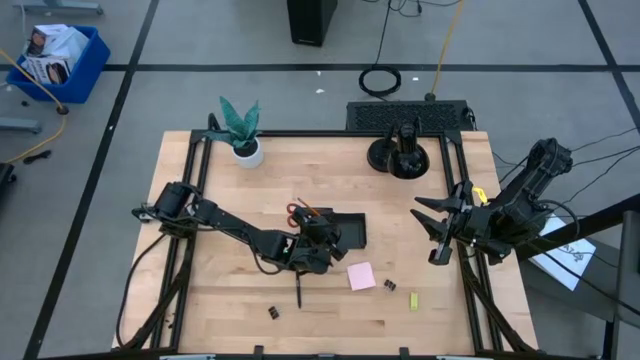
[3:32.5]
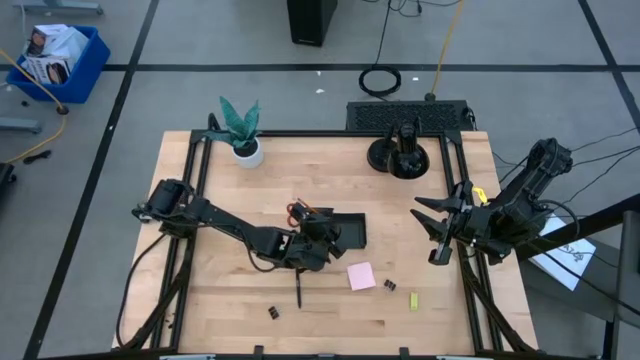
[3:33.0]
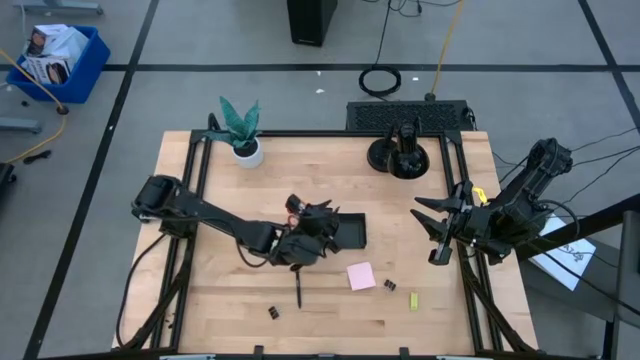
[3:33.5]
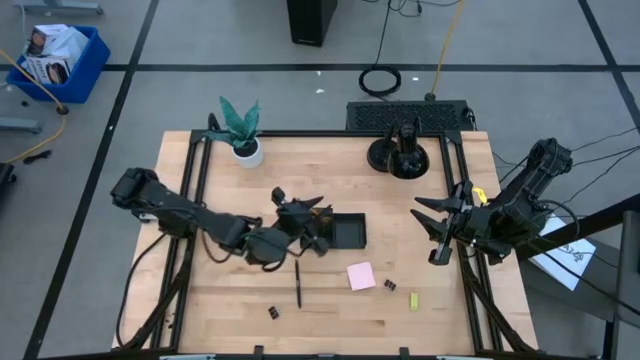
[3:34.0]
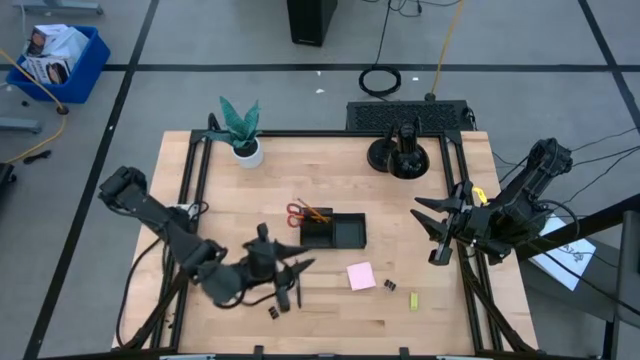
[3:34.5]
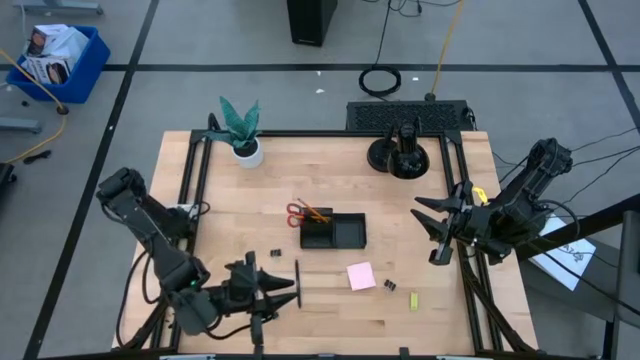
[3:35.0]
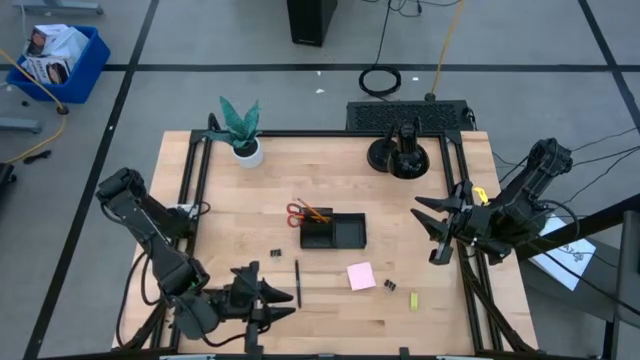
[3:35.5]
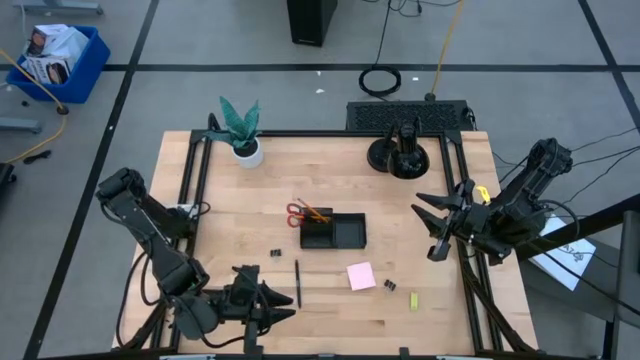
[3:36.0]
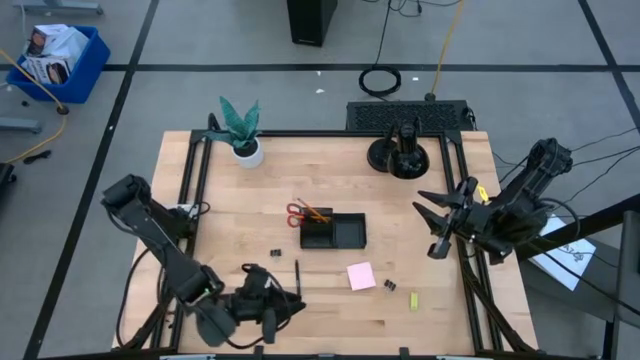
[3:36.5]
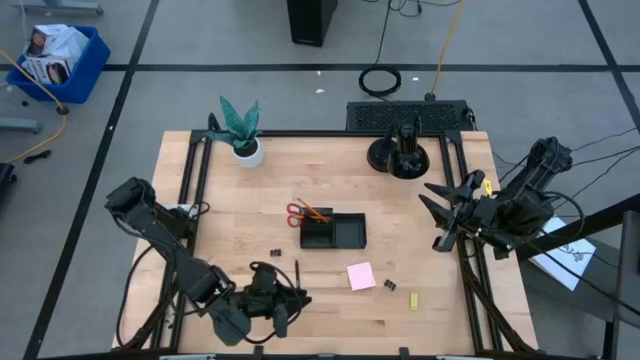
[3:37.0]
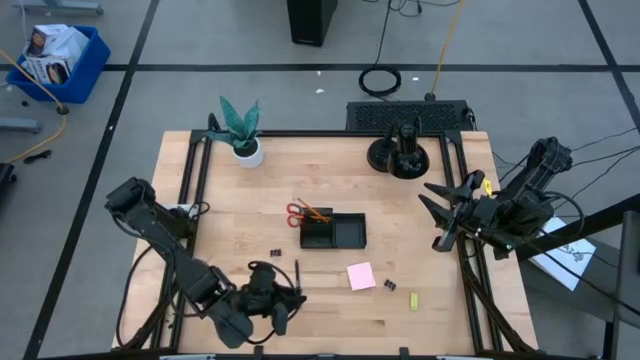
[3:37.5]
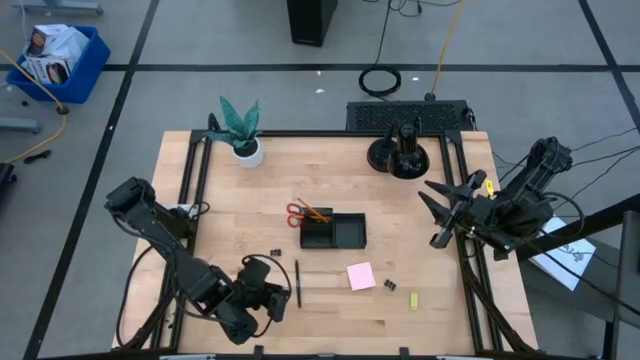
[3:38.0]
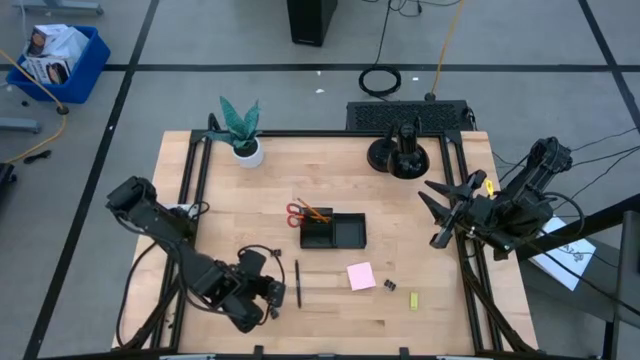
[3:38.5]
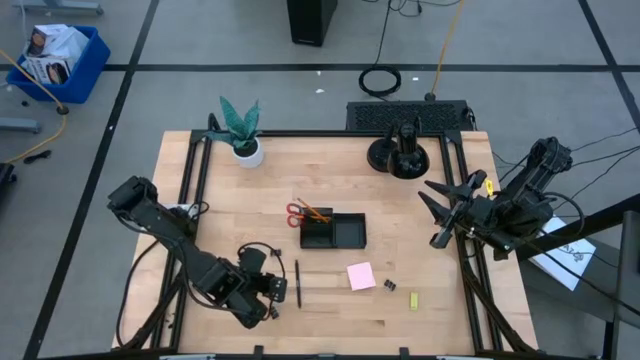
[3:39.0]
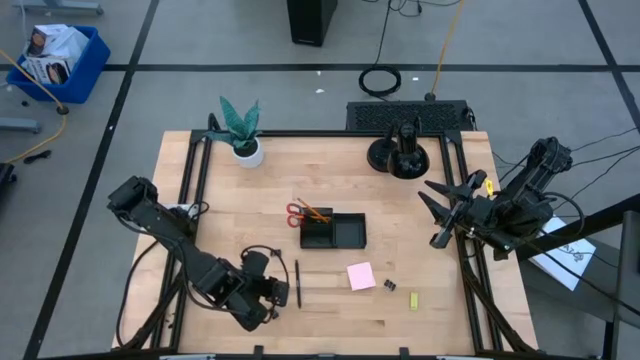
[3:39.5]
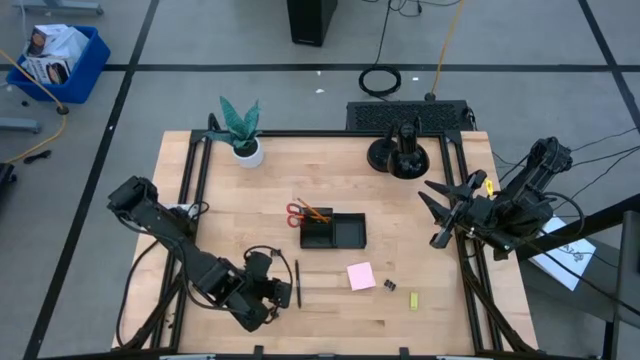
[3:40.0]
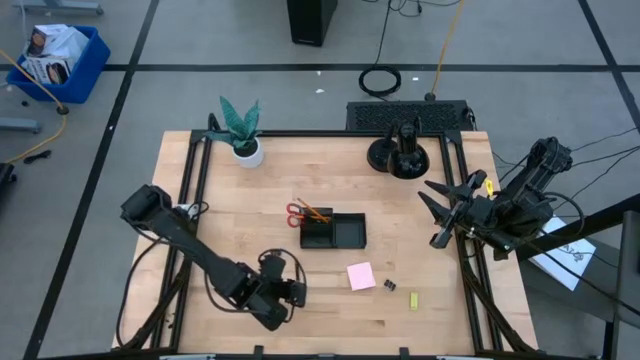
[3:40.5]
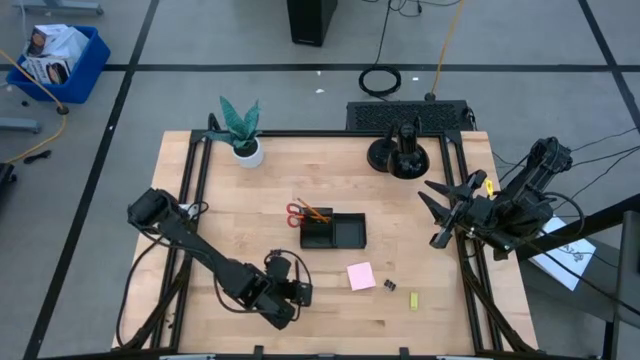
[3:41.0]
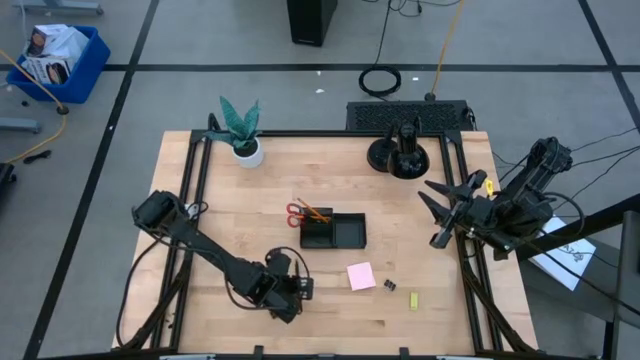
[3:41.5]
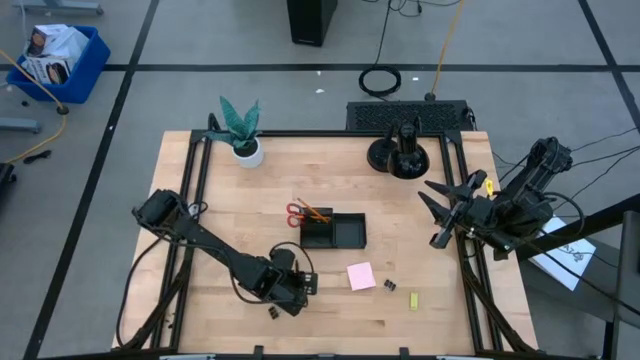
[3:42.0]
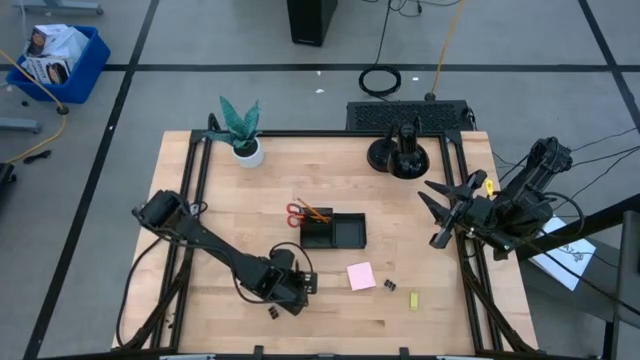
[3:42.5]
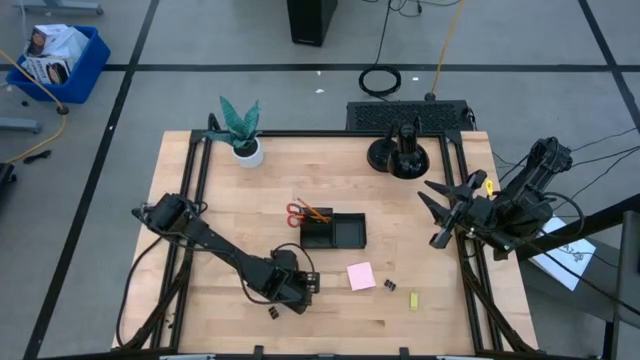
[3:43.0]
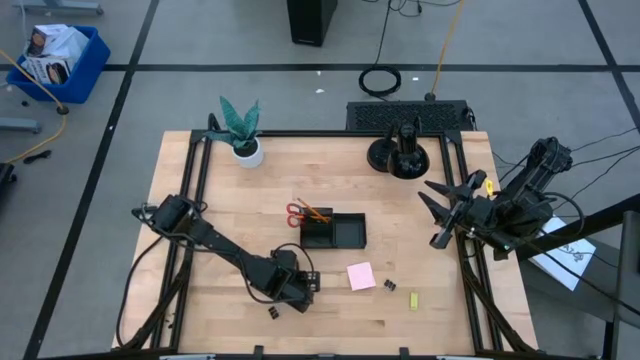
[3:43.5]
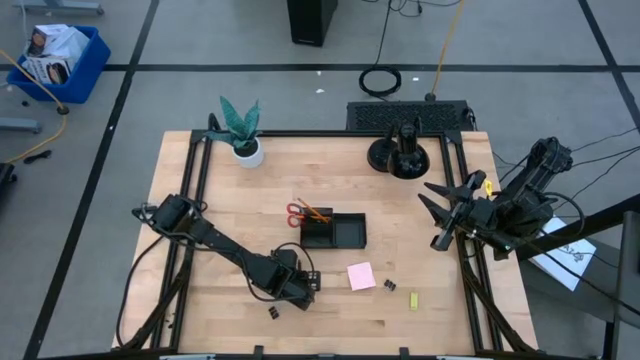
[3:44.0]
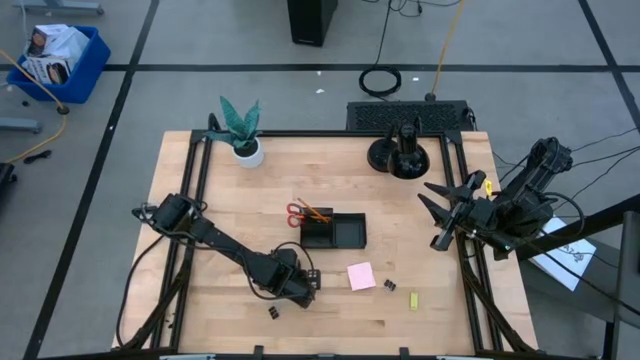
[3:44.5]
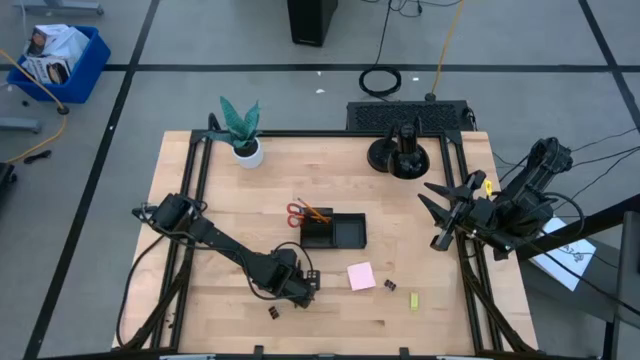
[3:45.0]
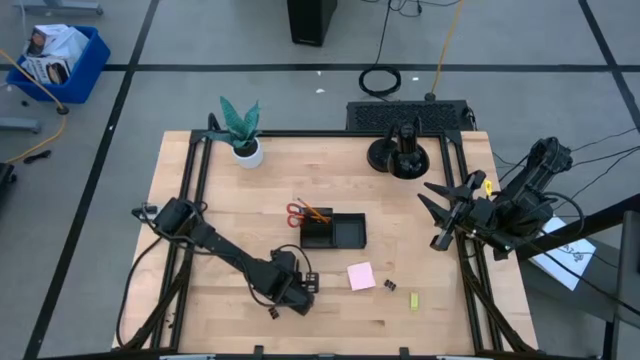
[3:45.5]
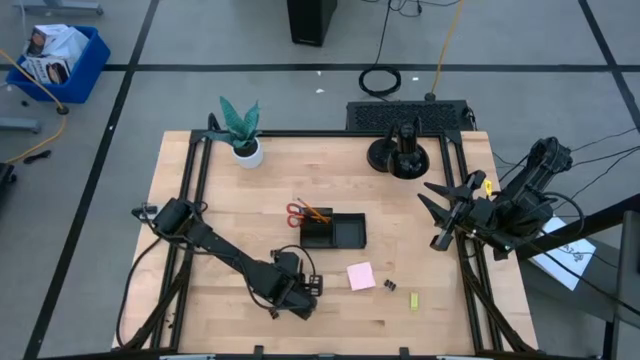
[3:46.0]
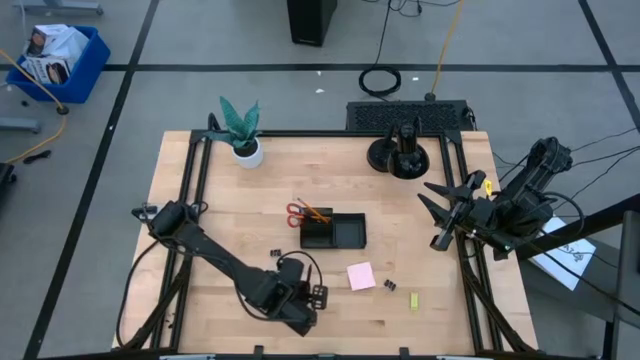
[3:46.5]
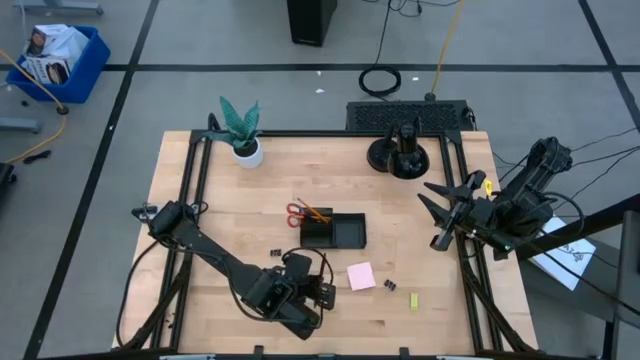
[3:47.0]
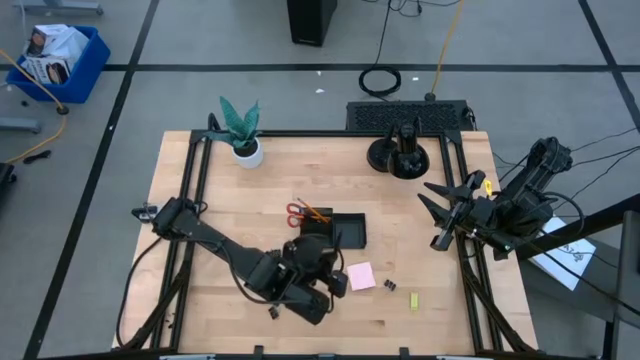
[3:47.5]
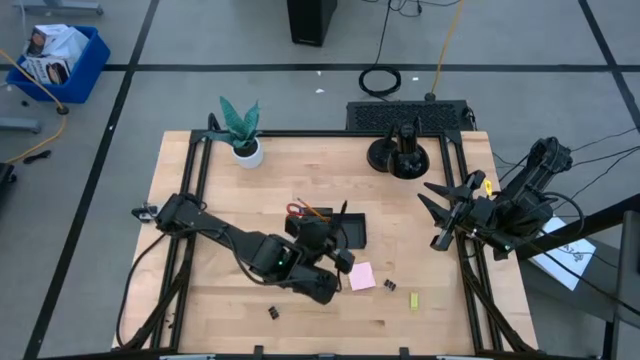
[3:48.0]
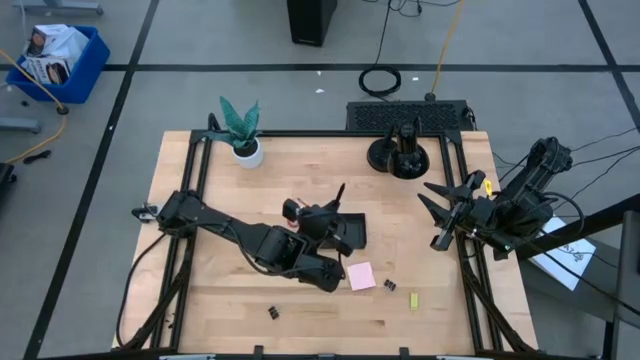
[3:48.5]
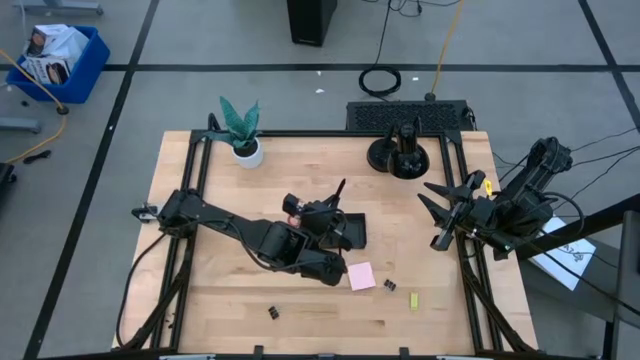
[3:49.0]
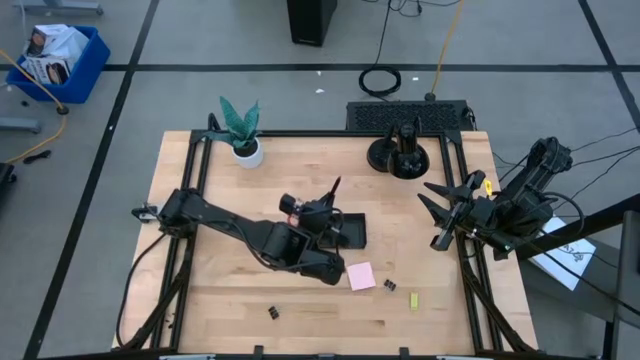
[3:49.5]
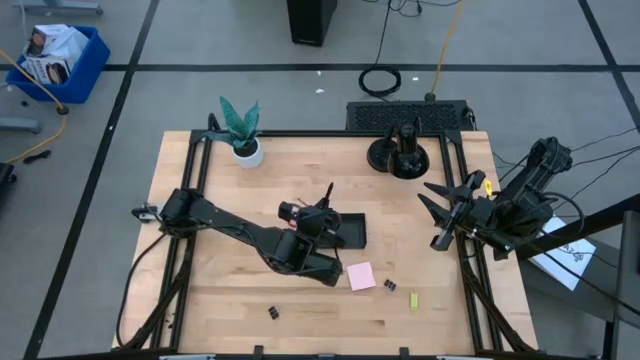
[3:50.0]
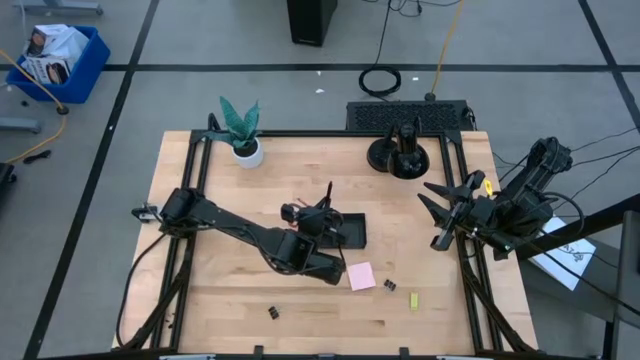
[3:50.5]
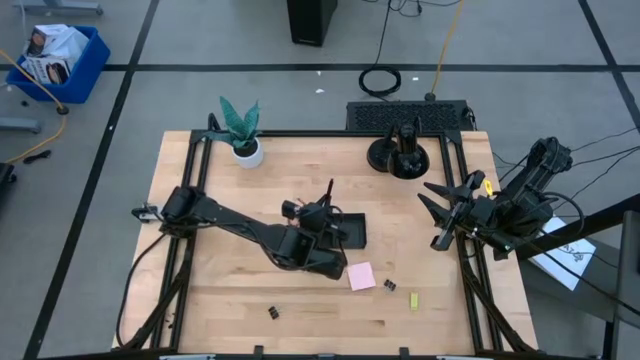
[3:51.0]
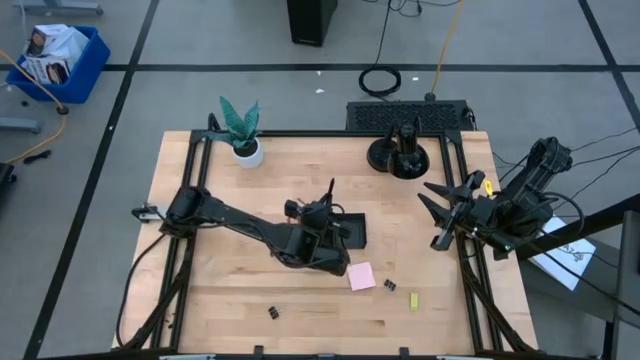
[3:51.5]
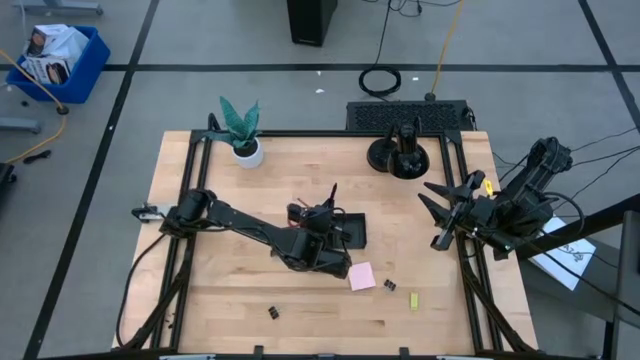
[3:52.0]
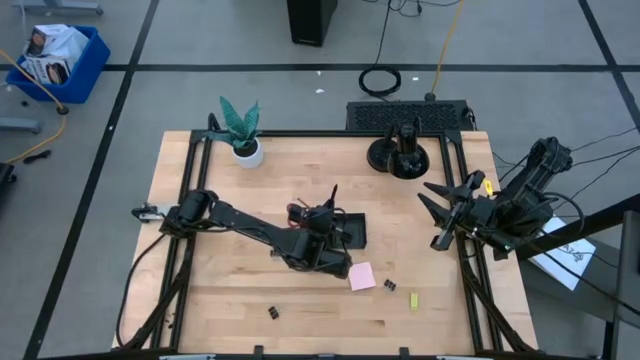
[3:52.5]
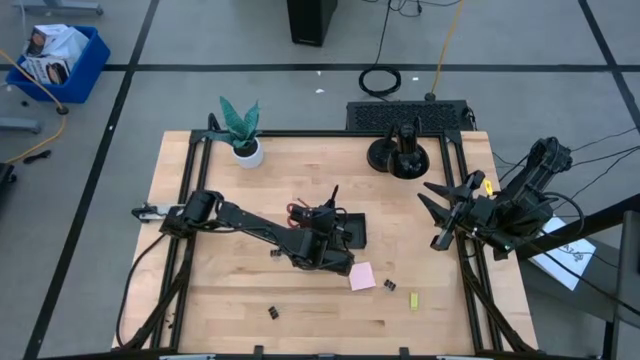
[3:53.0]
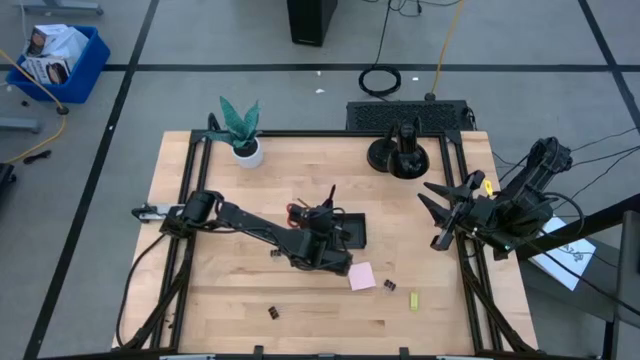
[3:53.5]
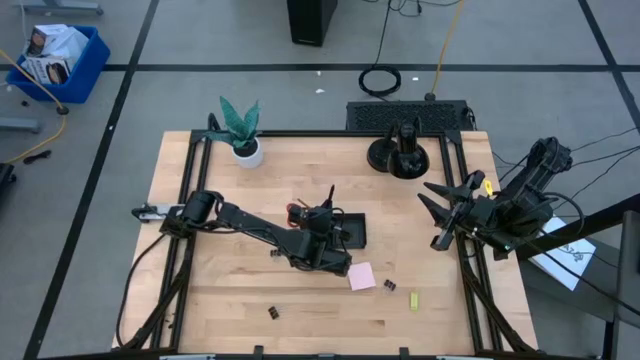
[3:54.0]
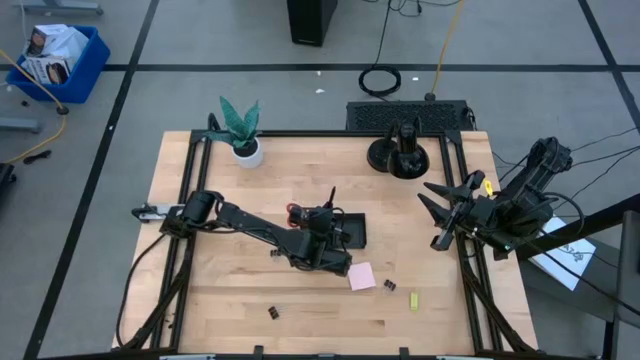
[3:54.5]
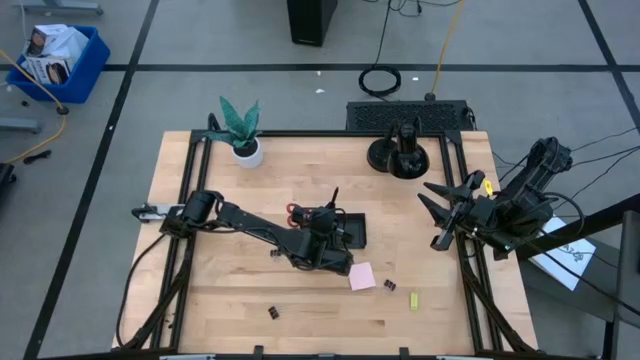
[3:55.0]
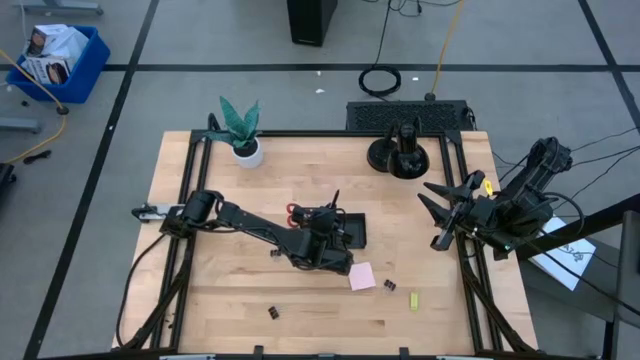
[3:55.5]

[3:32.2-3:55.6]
Task: Pick and place office supplies into organizer
Put the black pen into the desk organizer
